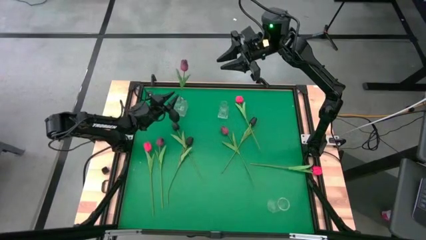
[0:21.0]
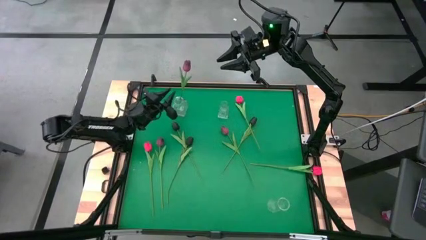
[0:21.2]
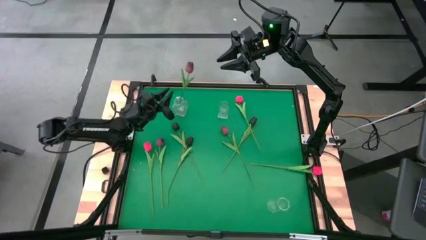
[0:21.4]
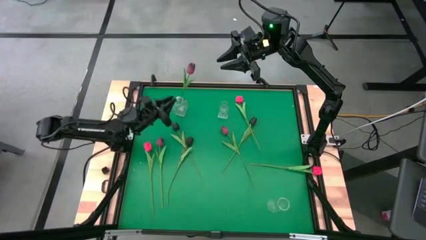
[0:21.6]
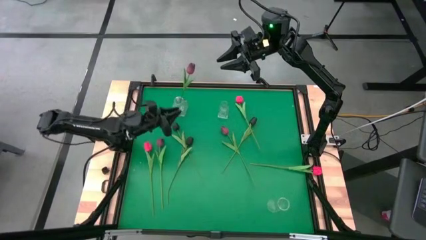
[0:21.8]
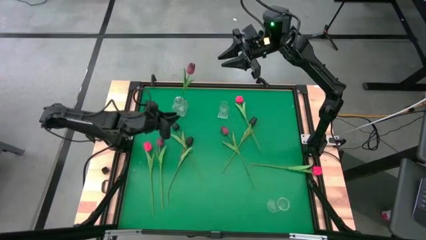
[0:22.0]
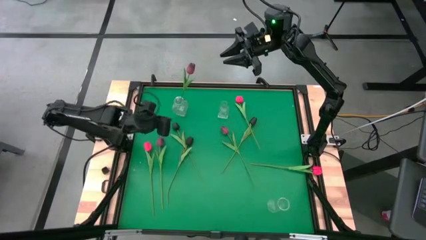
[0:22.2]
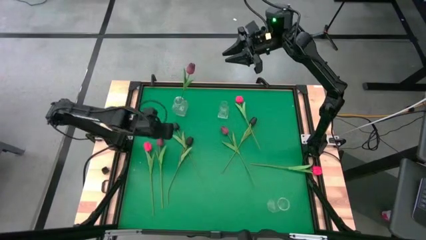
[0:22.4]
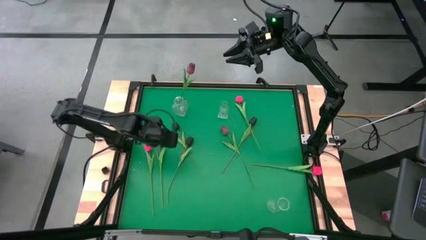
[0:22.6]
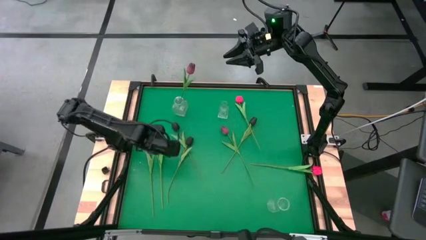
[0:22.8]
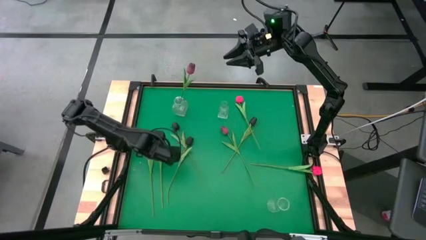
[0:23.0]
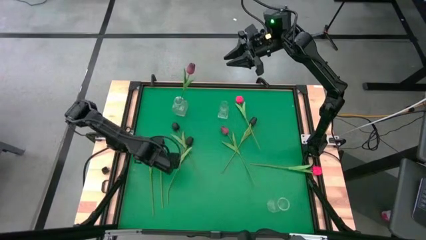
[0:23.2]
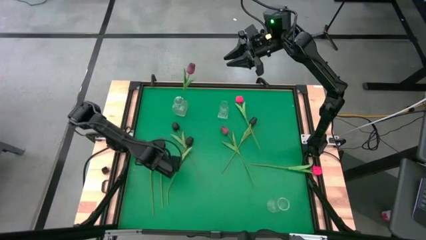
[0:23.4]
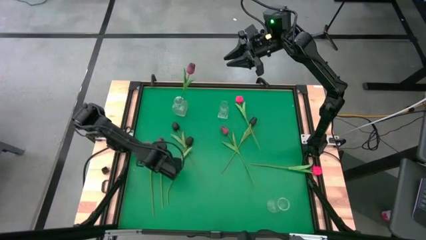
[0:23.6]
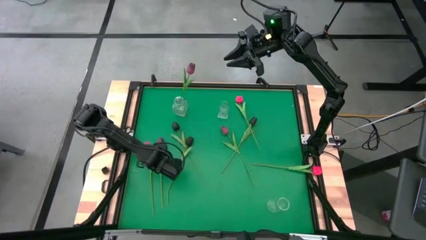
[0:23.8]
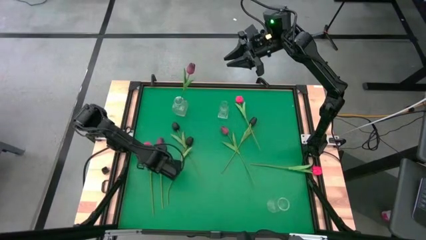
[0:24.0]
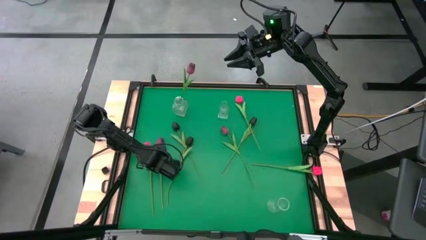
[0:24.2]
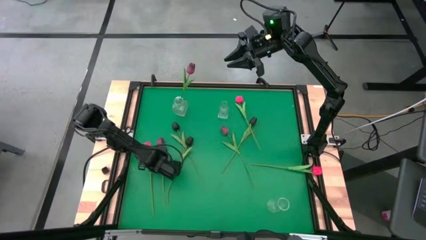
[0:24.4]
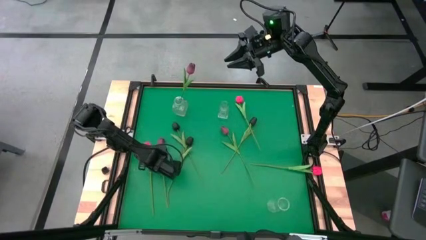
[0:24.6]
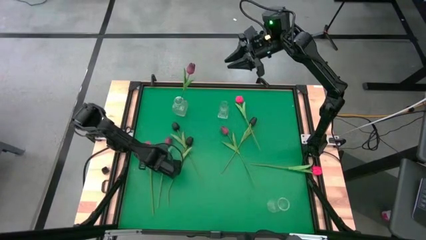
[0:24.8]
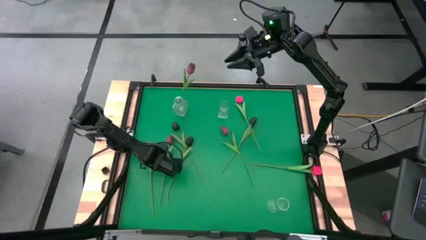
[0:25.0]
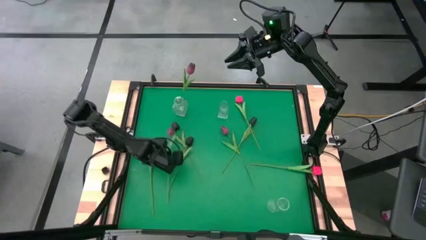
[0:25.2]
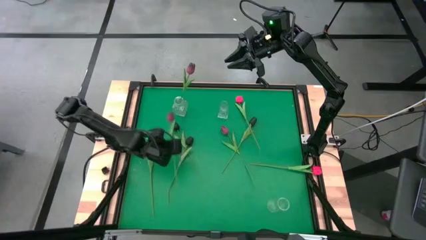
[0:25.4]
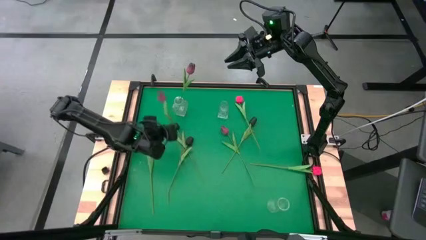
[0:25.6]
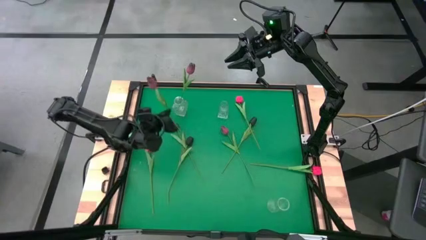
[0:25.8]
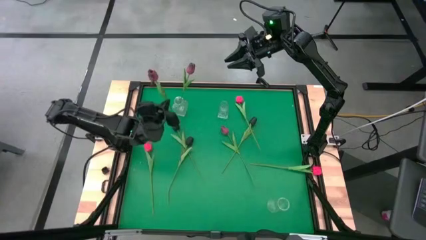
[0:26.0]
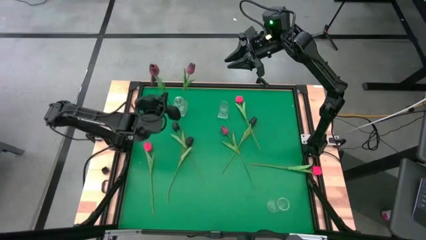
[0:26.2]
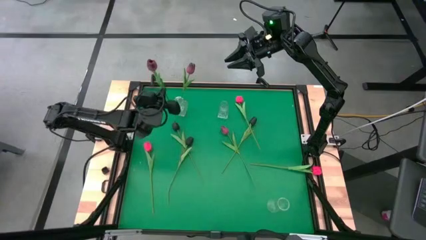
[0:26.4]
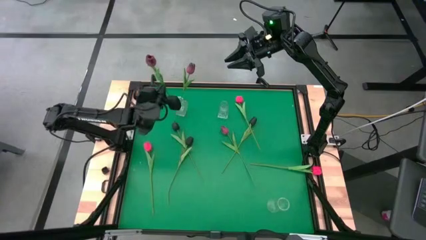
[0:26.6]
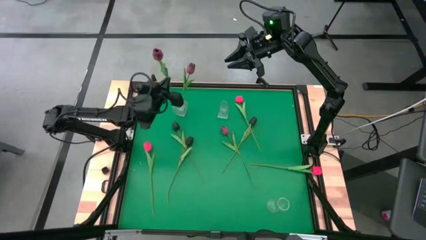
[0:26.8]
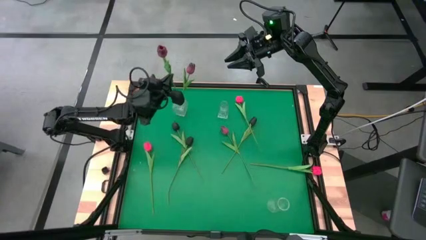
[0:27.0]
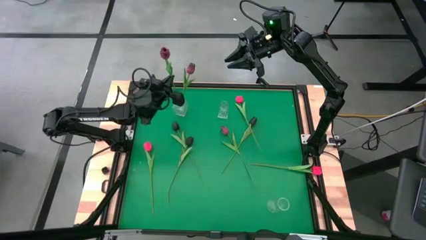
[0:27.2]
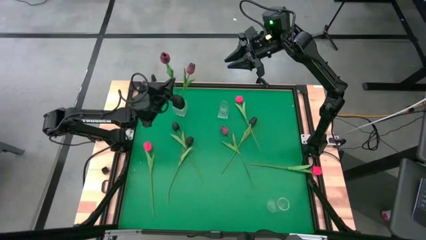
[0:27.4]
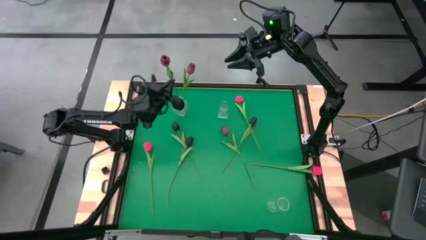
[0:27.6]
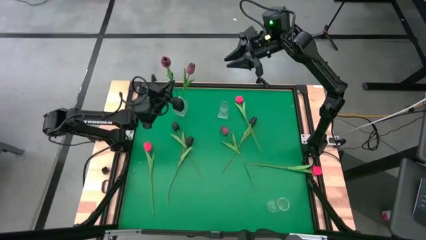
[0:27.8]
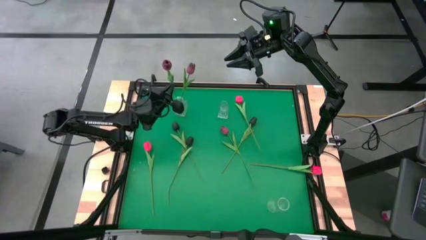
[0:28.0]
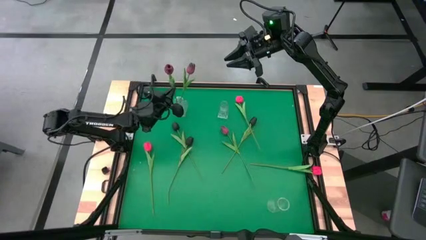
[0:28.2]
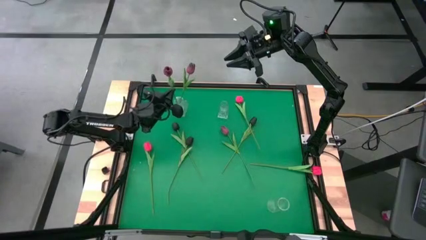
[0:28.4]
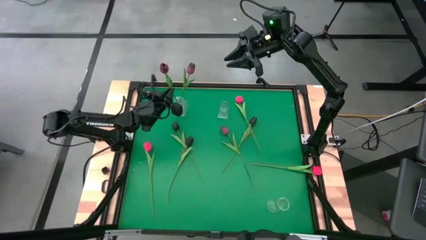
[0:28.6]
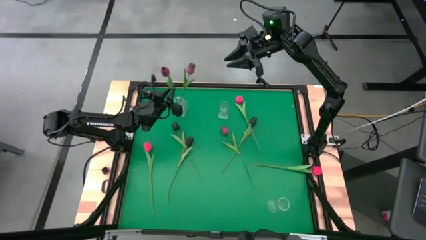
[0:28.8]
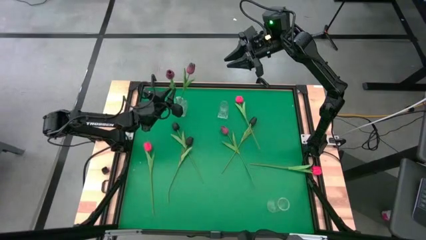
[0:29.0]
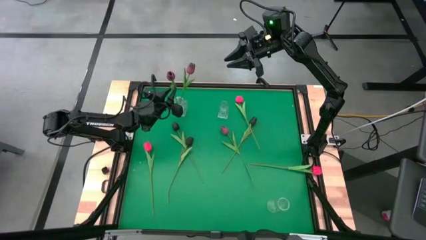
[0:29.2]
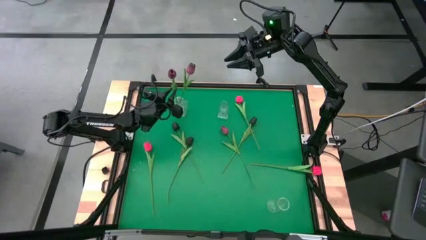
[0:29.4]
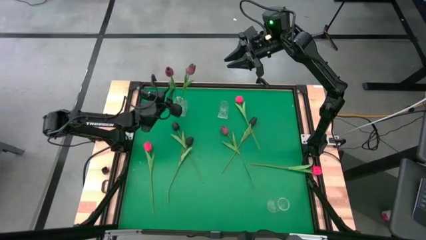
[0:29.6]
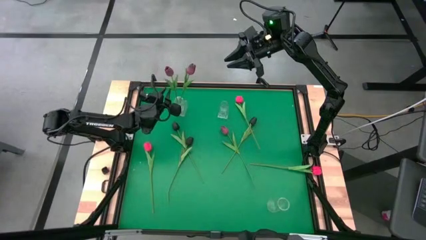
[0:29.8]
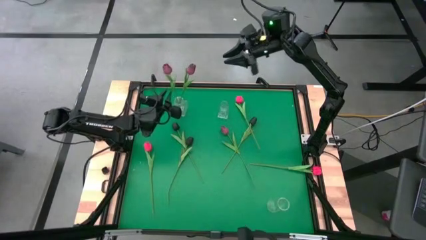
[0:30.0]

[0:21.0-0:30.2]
Task: Sort flowers into vase by color
Put the left dark red tulip into the top left transparent vase

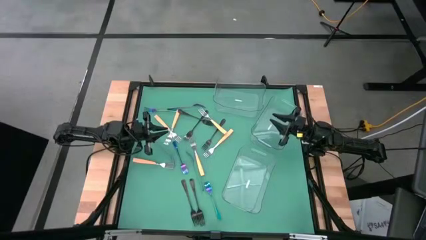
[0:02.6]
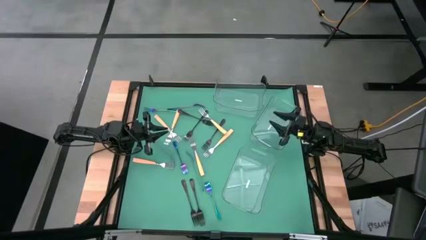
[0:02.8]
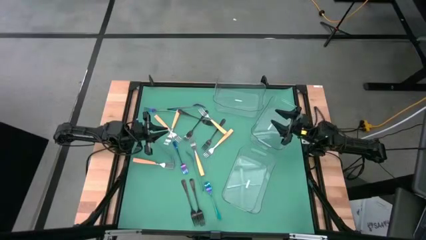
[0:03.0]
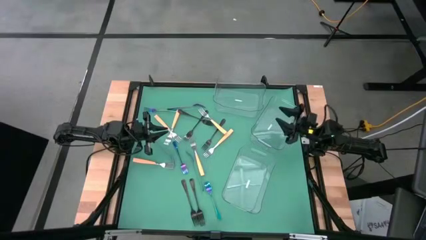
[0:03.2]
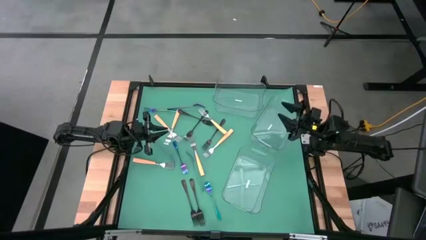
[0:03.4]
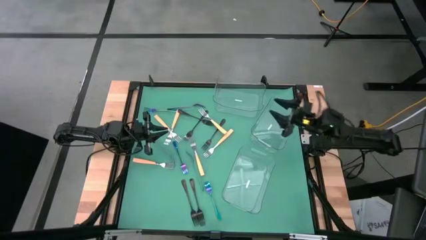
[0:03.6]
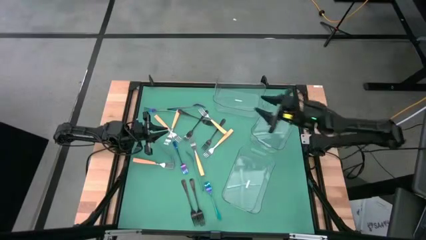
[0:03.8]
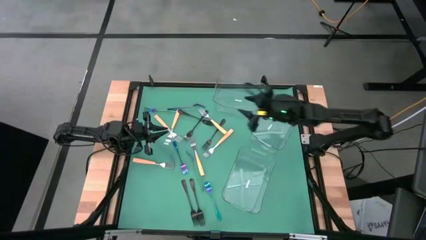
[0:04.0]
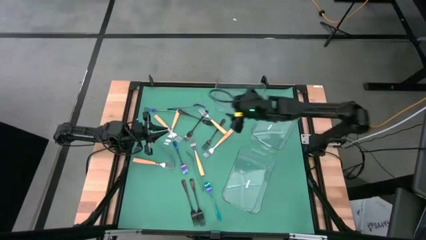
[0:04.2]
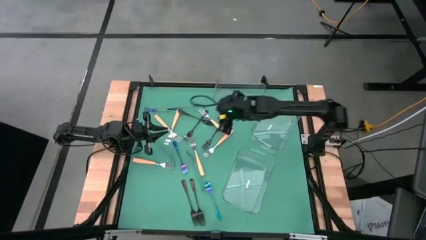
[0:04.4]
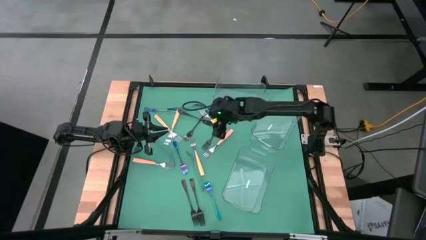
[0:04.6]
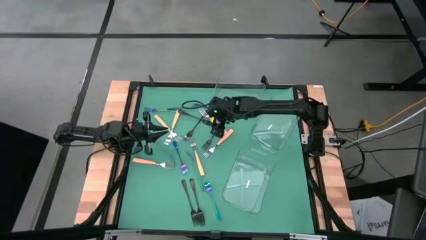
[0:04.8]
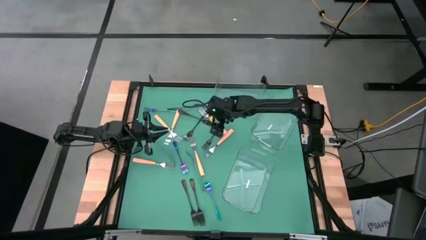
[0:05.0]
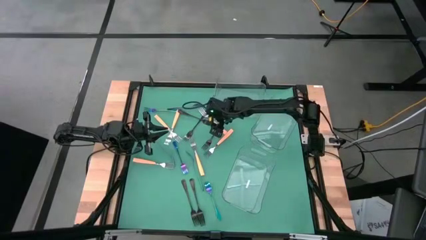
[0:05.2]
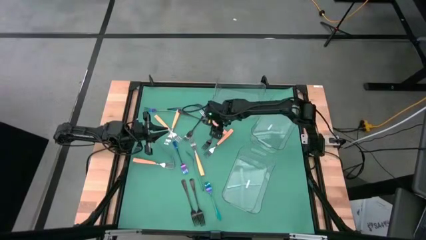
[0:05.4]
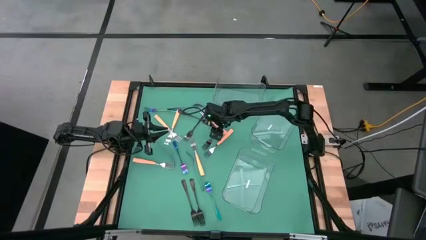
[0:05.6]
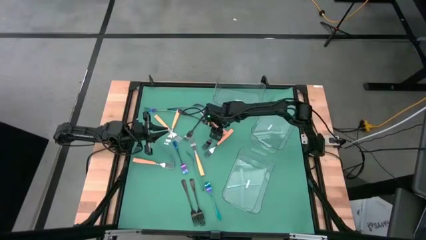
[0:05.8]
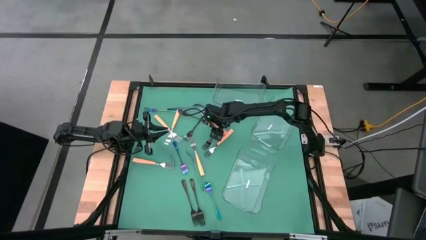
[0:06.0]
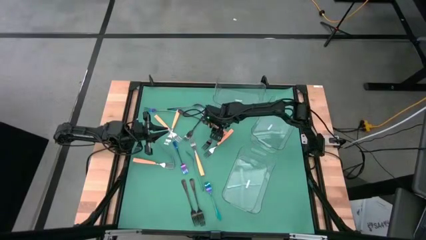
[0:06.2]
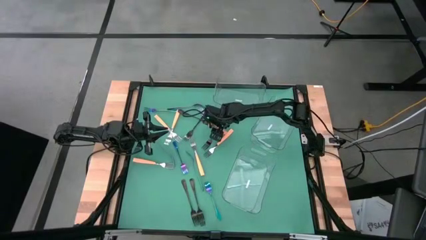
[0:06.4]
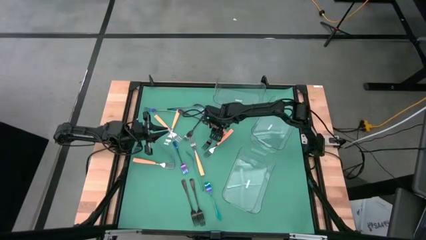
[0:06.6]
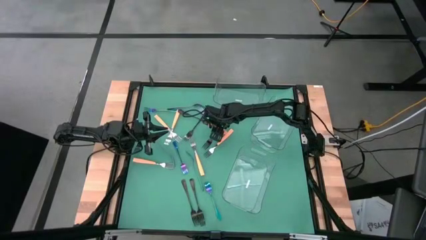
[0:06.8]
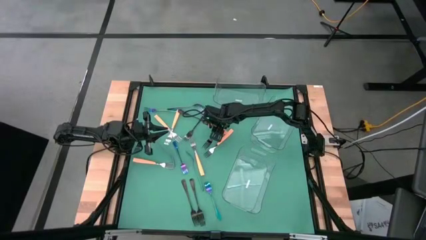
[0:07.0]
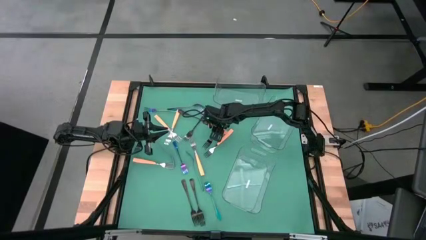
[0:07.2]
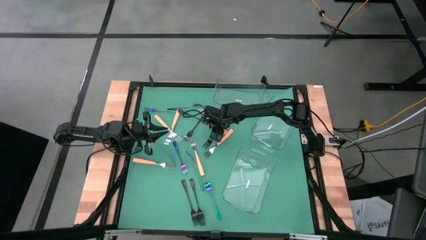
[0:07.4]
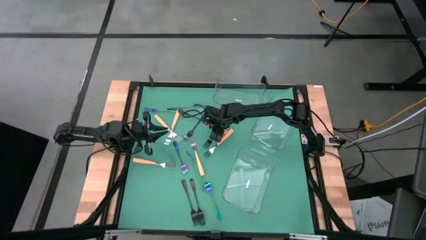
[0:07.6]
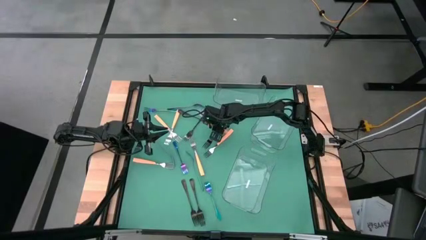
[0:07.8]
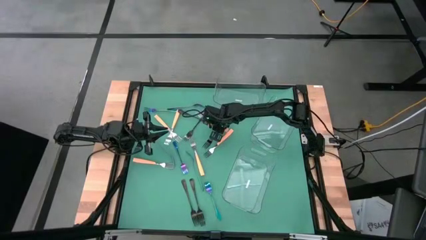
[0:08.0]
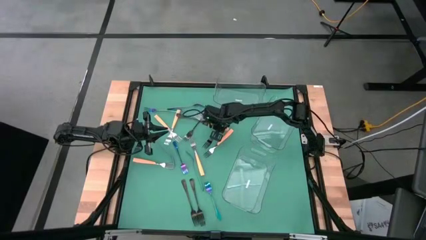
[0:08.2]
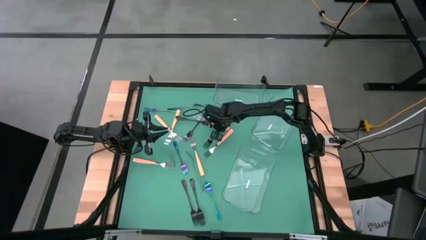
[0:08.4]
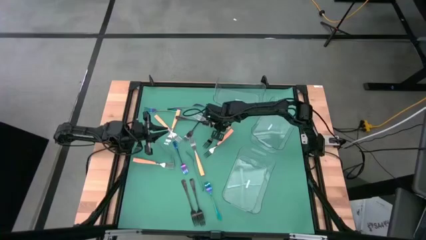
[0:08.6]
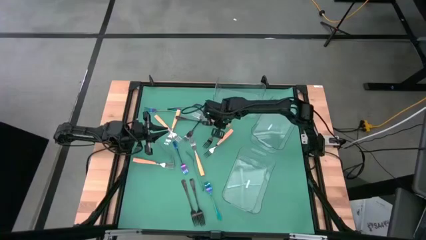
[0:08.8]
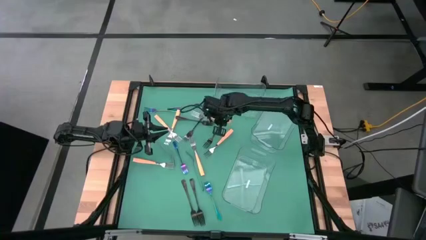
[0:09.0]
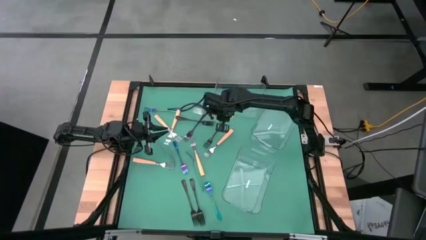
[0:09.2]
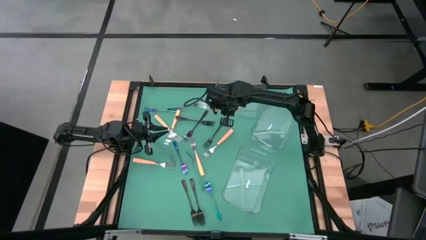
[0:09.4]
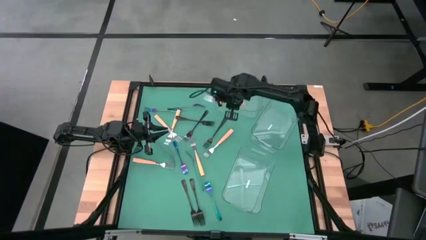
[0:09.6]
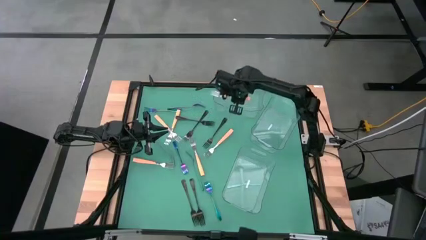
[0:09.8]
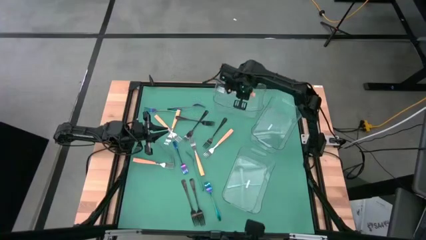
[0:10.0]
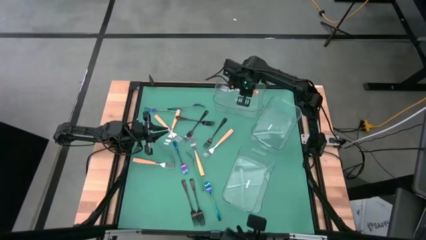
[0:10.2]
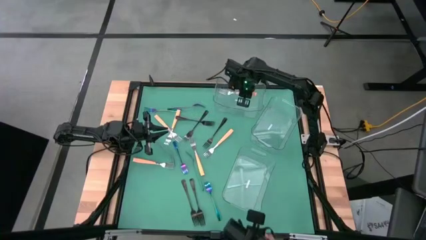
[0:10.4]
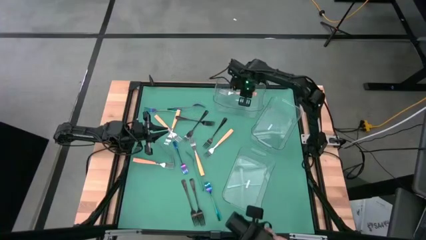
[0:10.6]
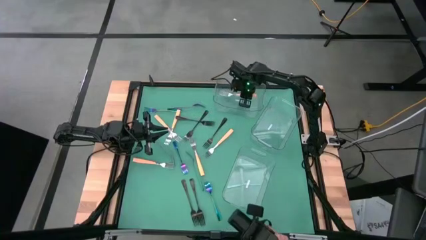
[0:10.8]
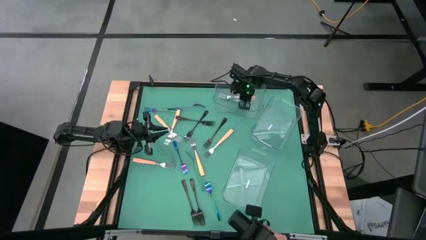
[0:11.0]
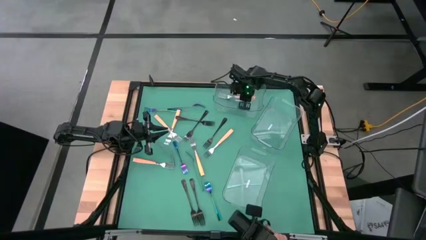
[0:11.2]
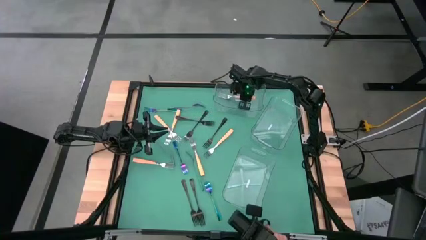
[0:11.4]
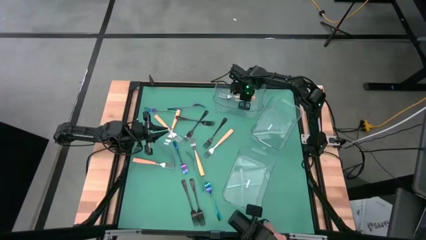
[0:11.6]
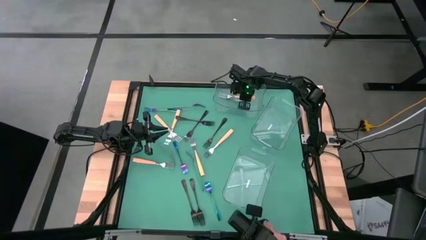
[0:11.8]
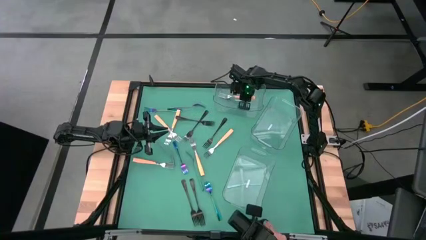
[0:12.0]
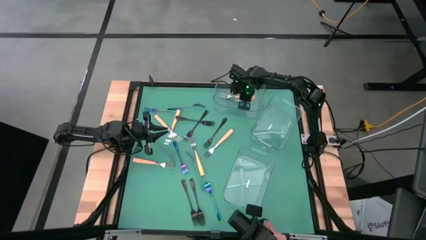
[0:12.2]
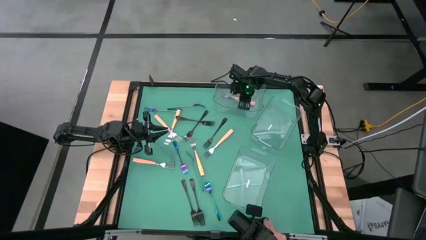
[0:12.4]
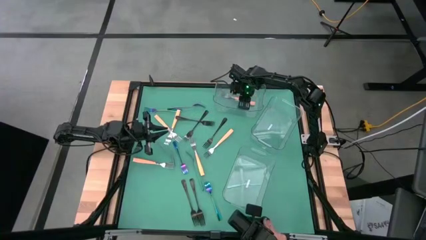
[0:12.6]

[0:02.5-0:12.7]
Task: Sort silverware by color (type)
Put the orange fork into the top transparent bin
